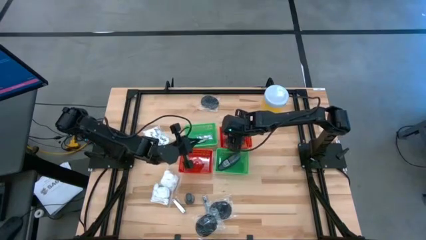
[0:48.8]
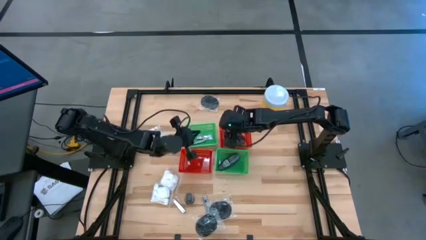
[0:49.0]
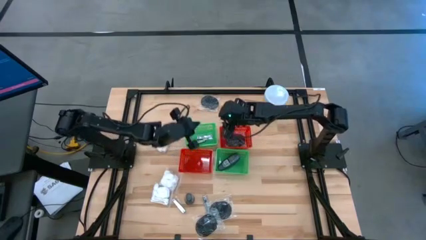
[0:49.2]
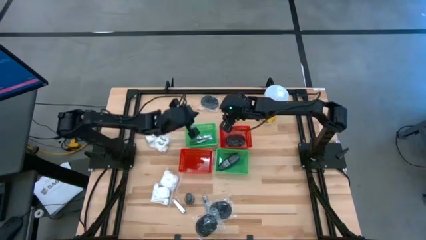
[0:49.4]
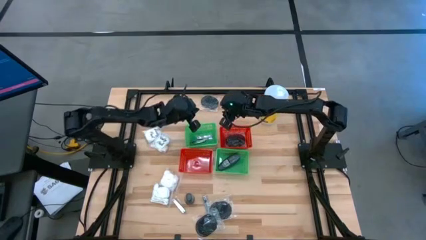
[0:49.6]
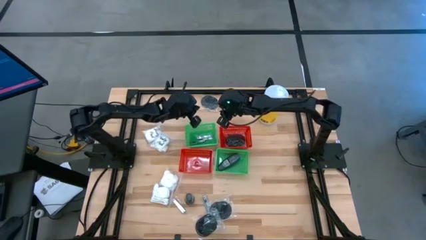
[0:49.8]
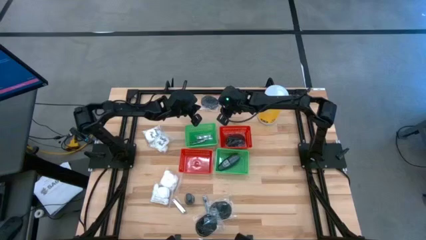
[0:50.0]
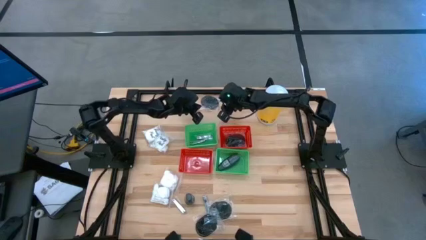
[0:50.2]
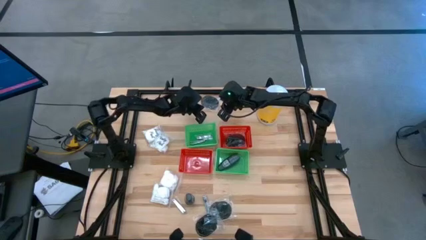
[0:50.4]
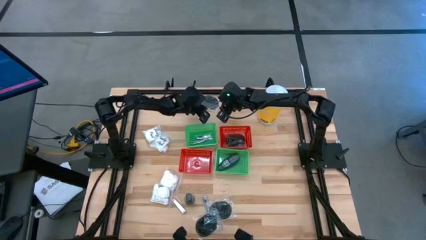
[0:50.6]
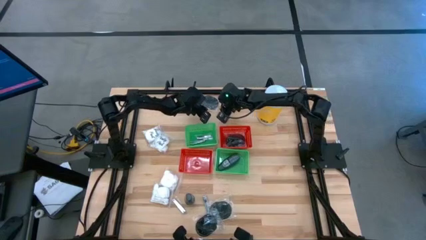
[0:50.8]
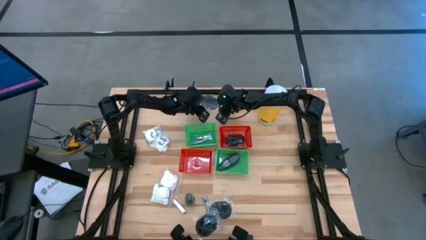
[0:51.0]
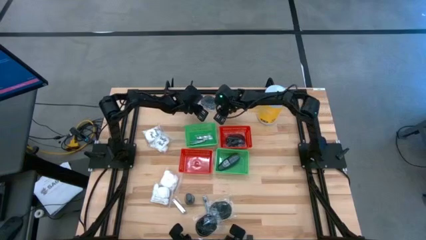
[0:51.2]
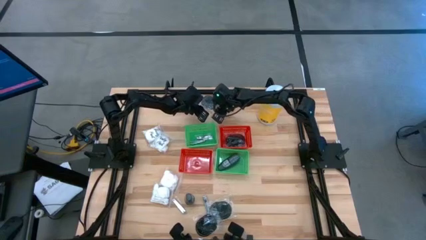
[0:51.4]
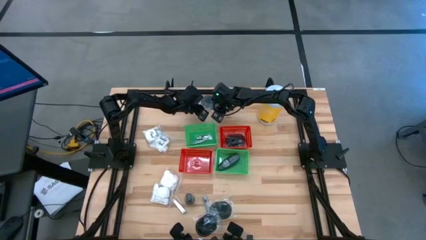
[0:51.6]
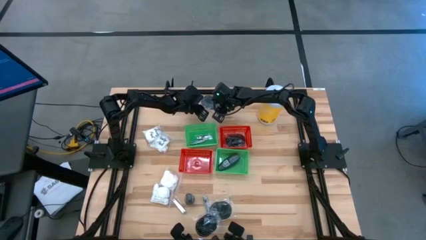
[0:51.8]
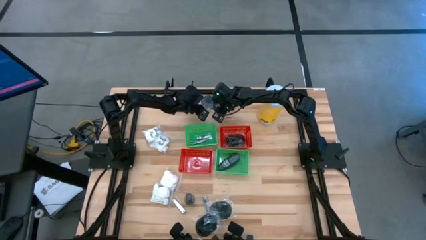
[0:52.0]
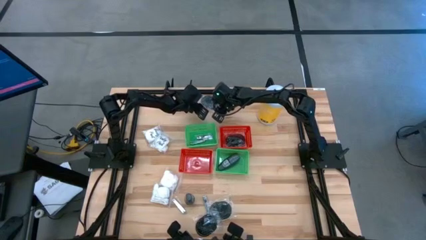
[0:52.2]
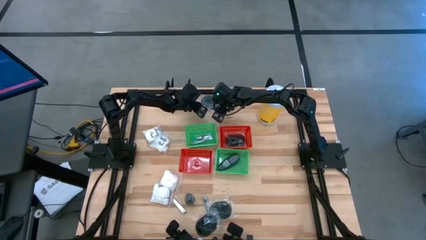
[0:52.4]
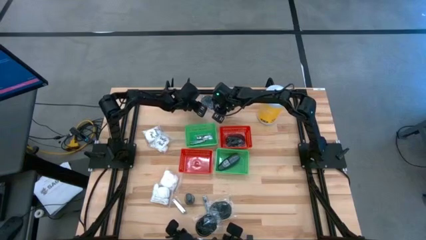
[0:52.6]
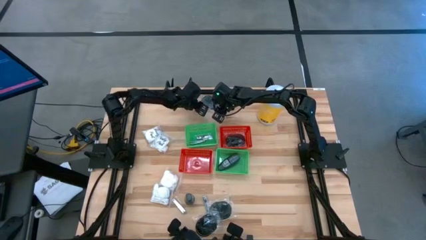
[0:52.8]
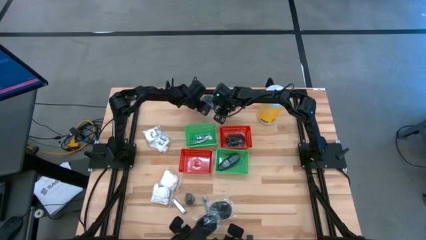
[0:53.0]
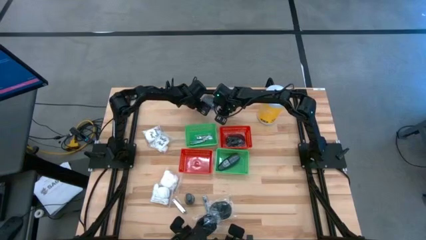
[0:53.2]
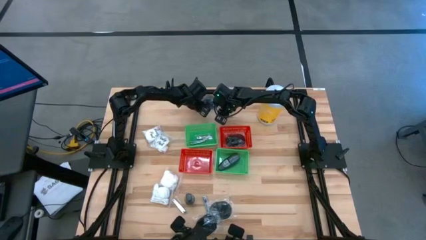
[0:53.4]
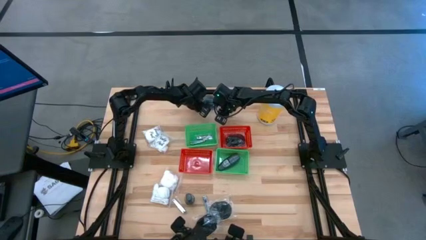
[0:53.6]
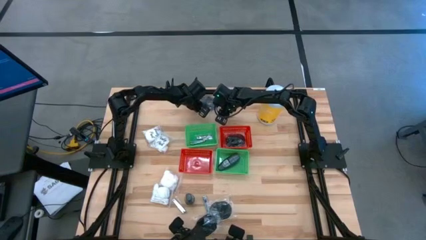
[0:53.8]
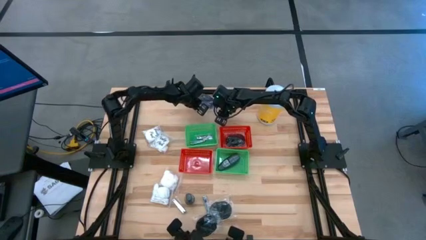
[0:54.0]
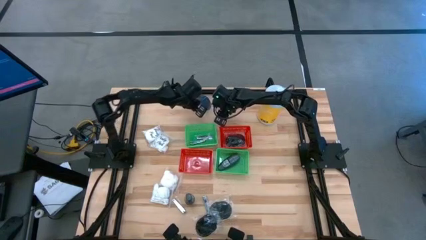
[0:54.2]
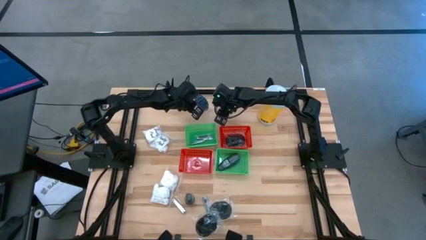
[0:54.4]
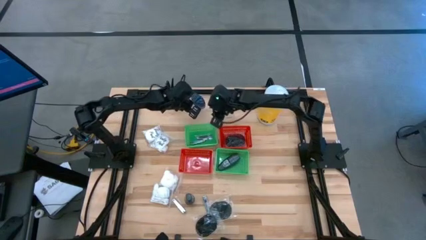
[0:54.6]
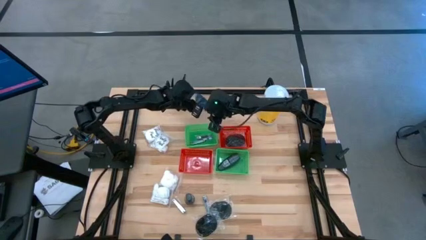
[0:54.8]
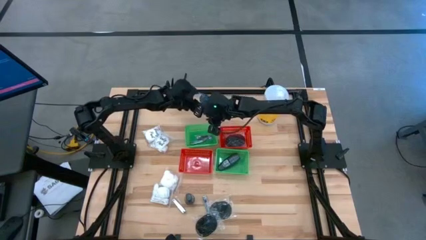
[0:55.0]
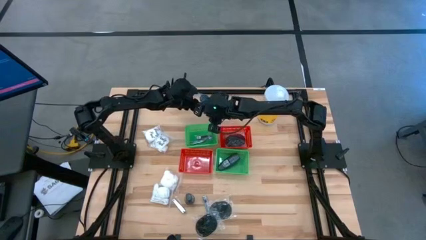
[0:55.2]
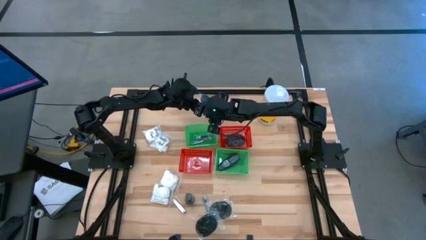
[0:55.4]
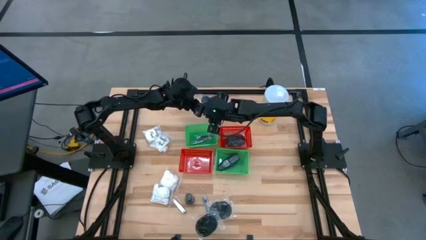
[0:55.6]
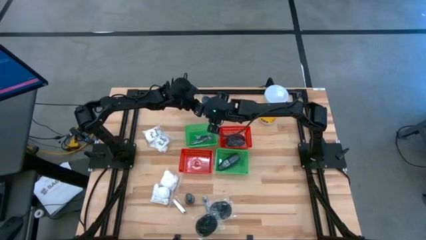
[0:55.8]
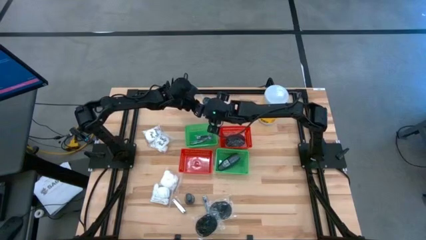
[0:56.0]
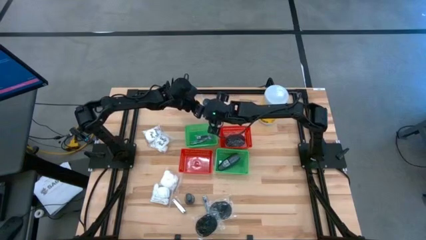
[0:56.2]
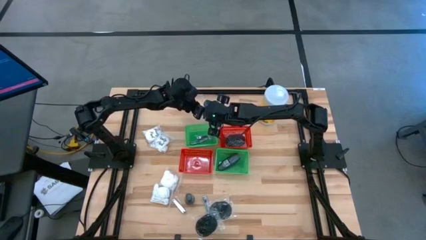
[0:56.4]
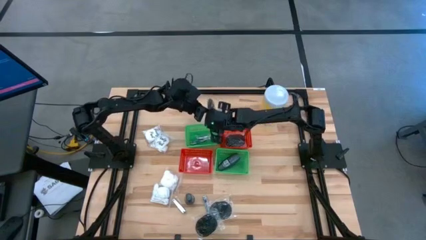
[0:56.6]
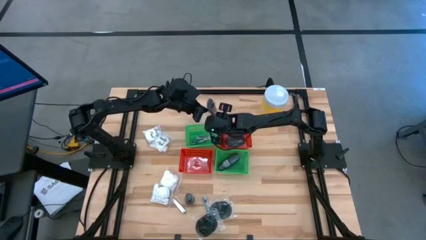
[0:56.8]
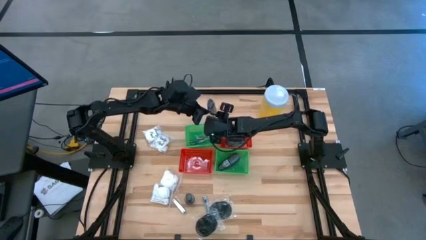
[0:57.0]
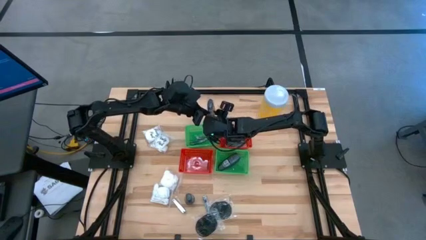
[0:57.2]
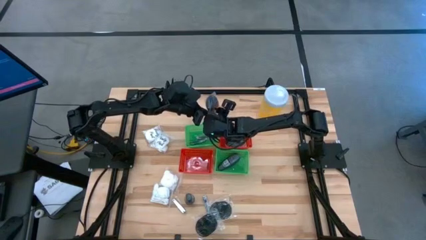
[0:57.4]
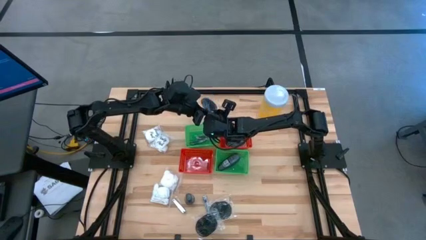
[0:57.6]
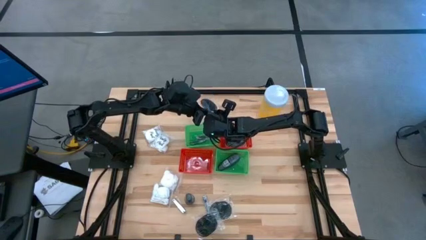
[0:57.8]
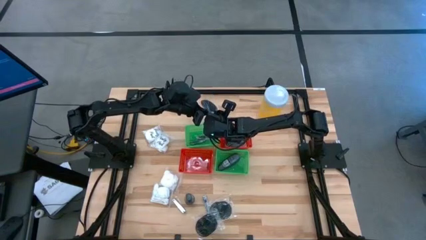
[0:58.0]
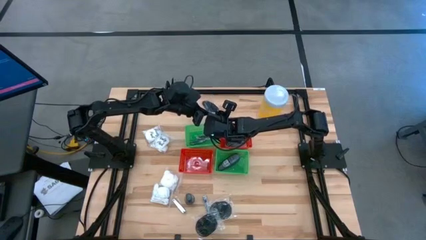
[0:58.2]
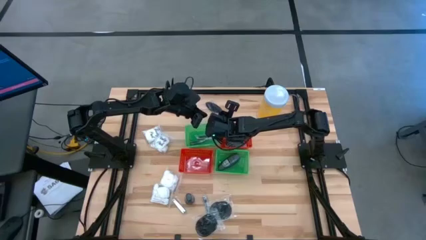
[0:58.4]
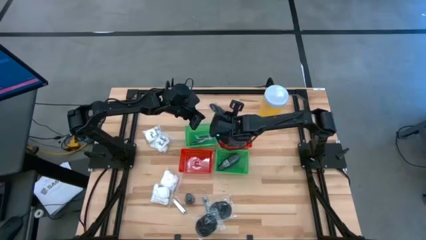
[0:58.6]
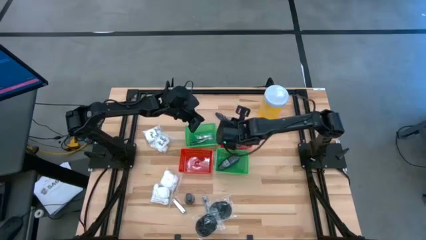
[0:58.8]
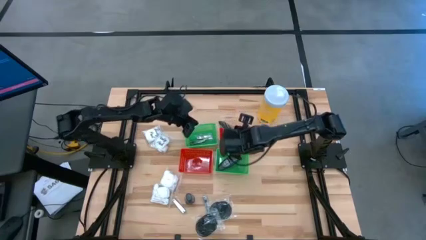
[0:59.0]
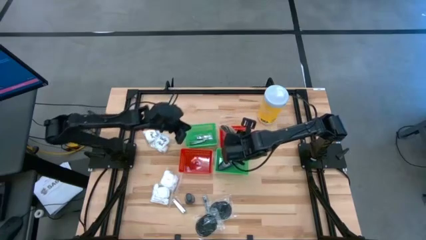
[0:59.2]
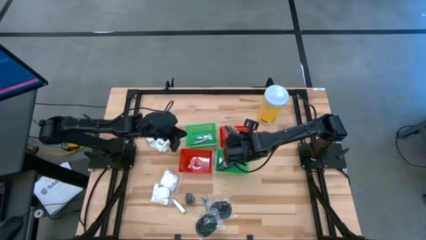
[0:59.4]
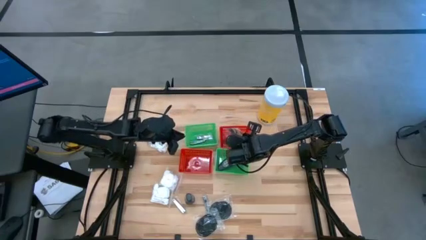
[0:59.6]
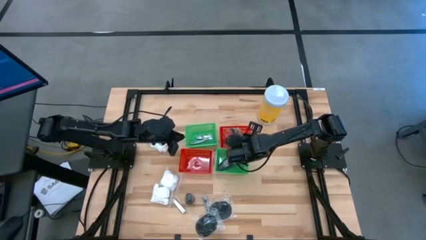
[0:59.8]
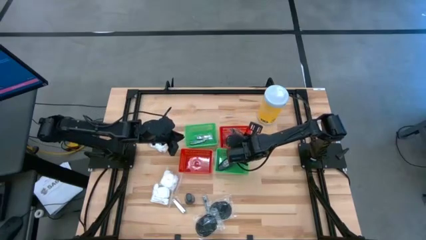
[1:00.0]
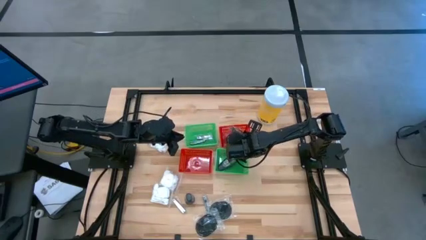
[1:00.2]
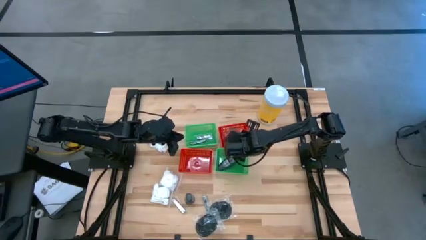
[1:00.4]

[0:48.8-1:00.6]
Task: Pick & Place Travel size toiletries
Put the black hairbrush into the right red basket

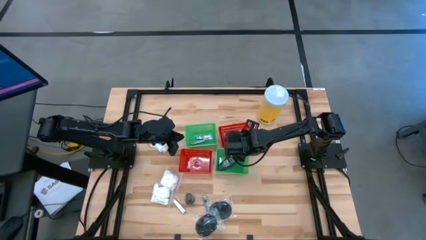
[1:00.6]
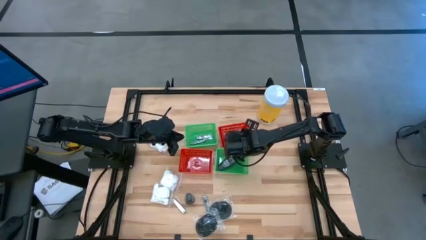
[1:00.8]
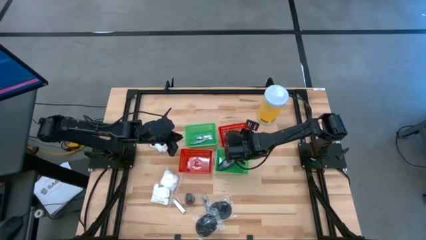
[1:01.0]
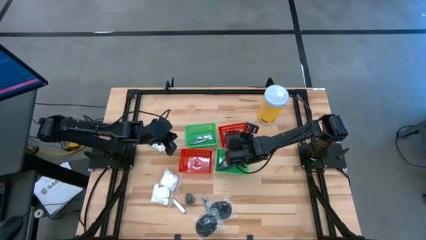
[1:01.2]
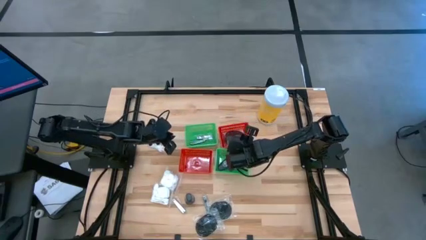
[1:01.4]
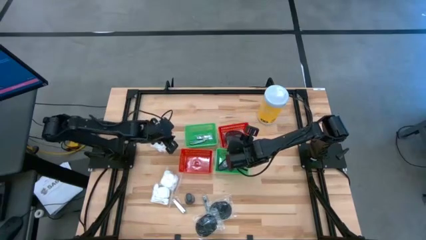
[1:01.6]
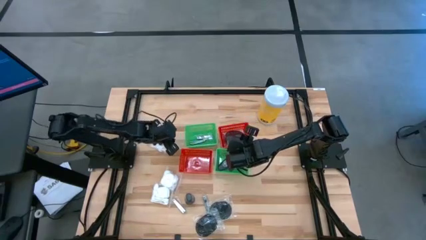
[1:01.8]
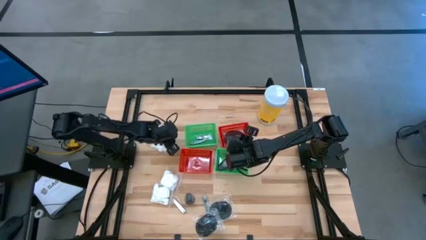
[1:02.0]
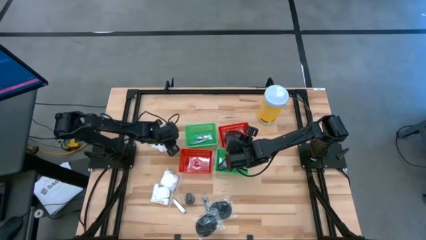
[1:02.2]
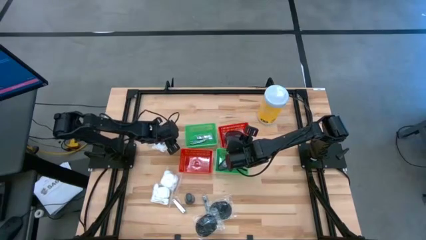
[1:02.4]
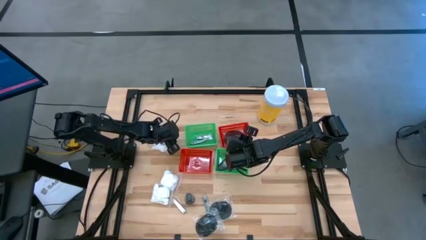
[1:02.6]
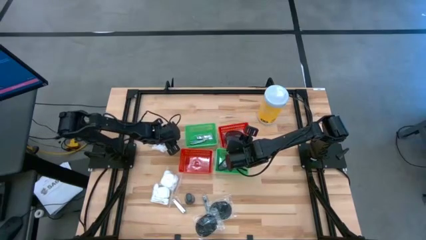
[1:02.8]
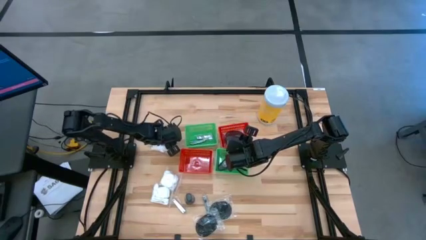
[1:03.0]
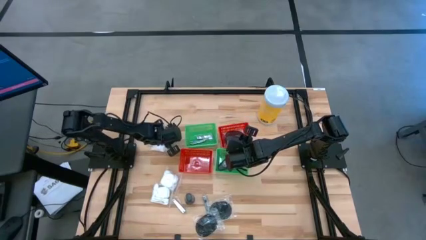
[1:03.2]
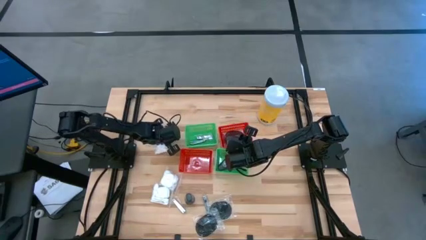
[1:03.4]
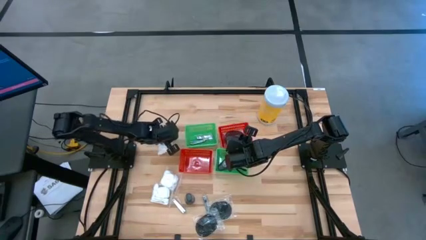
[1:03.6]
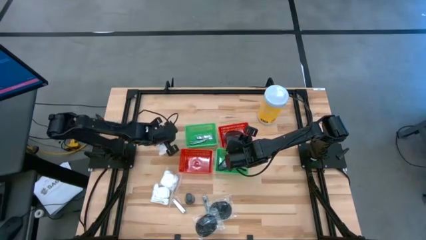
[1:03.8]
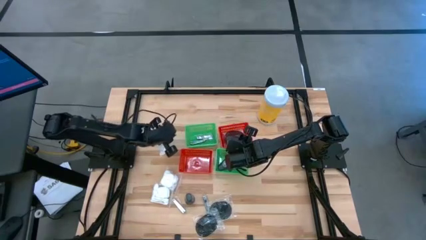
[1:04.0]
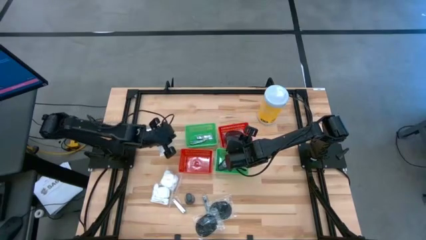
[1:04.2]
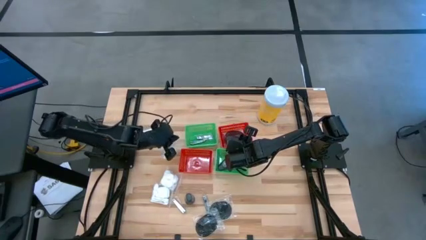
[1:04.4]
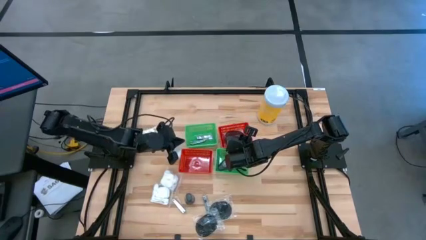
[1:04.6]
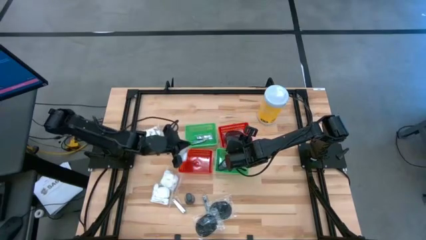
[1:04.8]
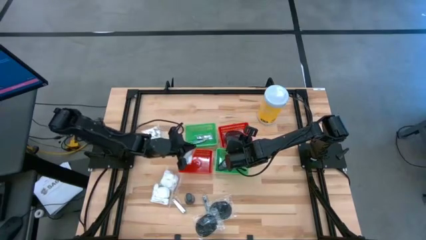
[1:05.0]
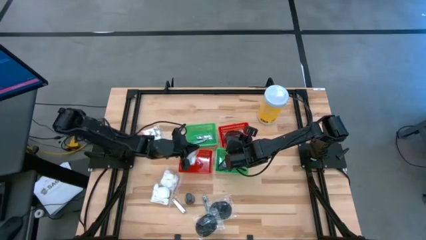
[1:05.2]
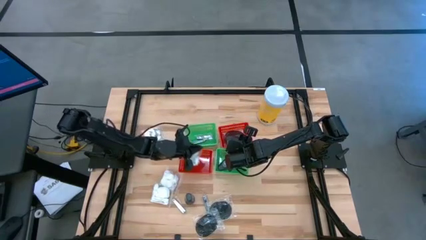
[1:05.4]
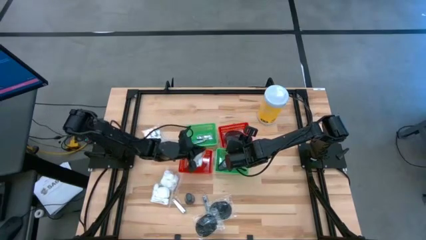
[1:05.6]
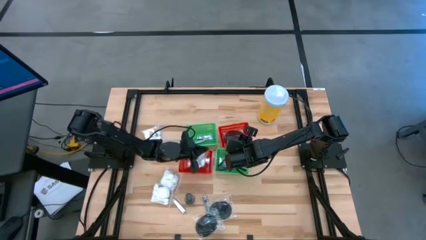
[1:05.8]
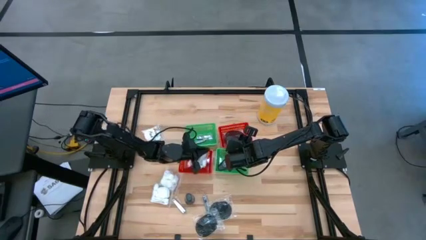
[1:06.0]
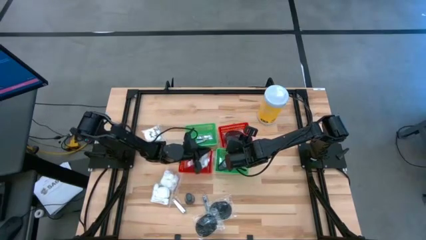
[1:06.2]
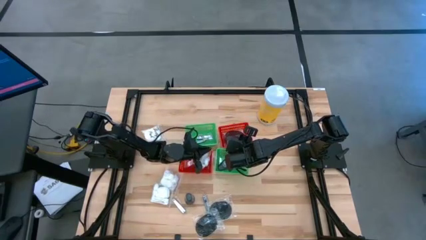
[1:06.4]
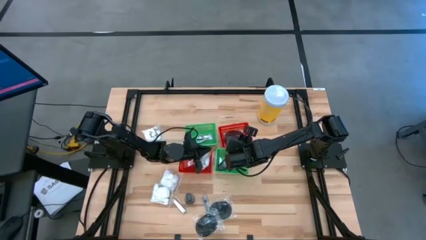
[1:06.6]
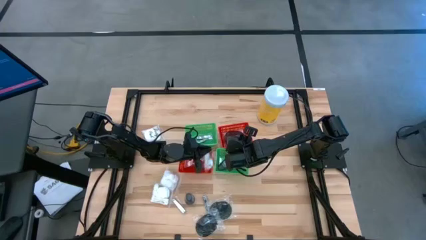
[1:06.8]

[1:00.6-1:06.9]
Put the white cotton pack into the left red basket
